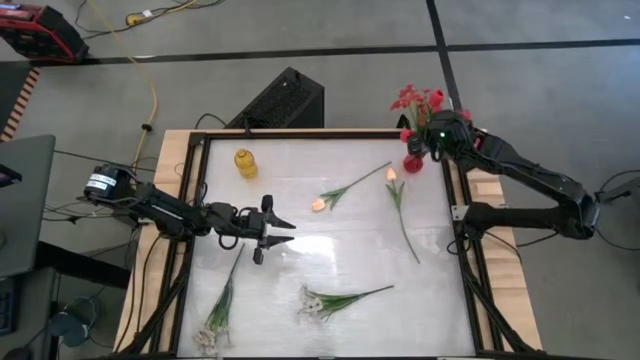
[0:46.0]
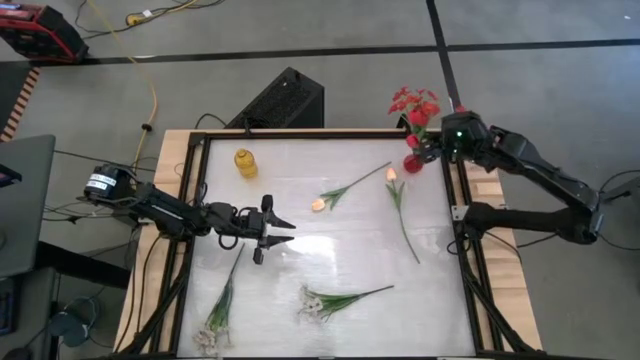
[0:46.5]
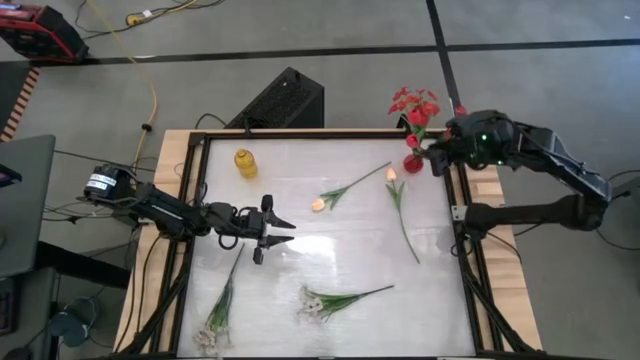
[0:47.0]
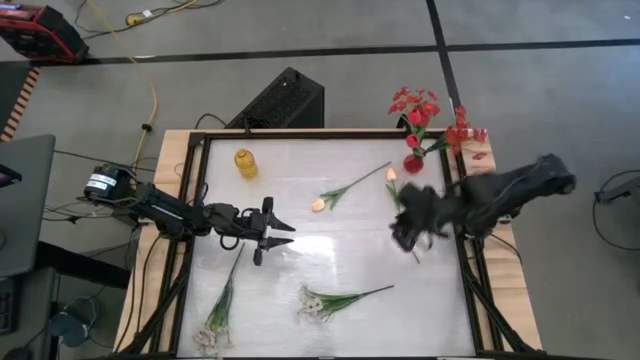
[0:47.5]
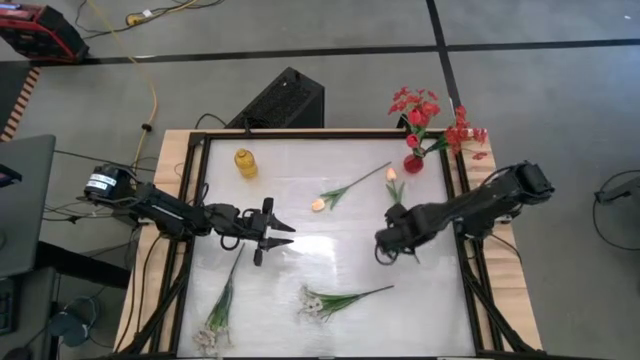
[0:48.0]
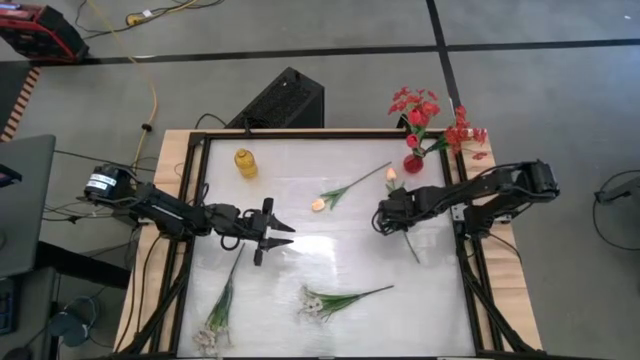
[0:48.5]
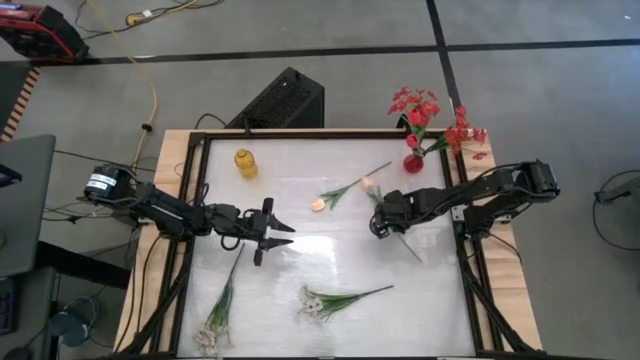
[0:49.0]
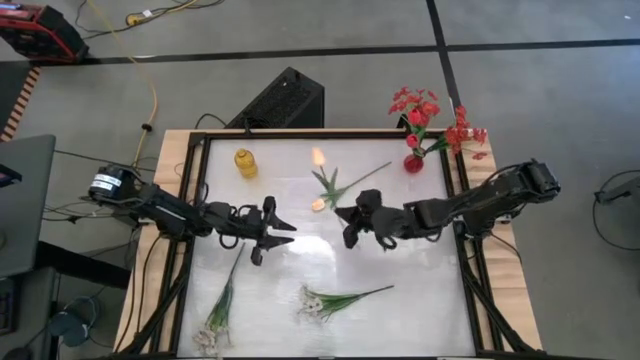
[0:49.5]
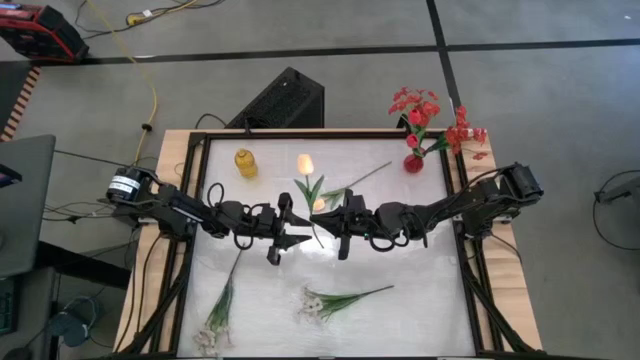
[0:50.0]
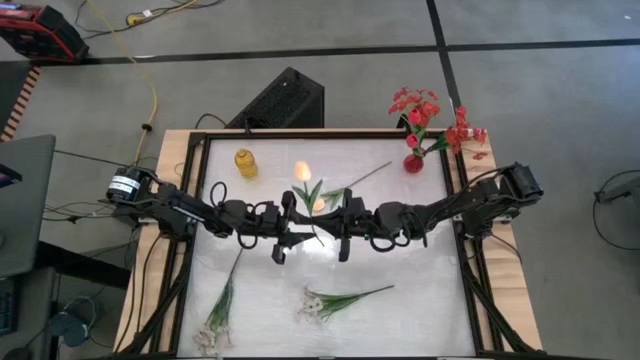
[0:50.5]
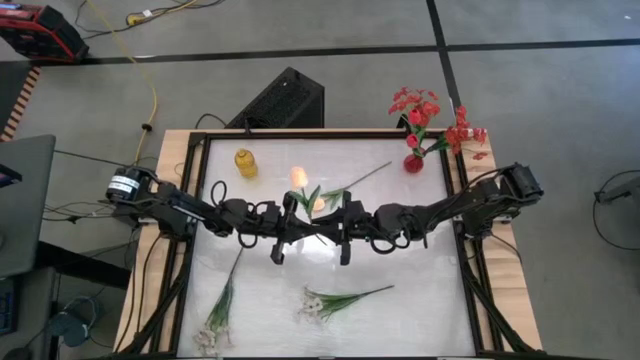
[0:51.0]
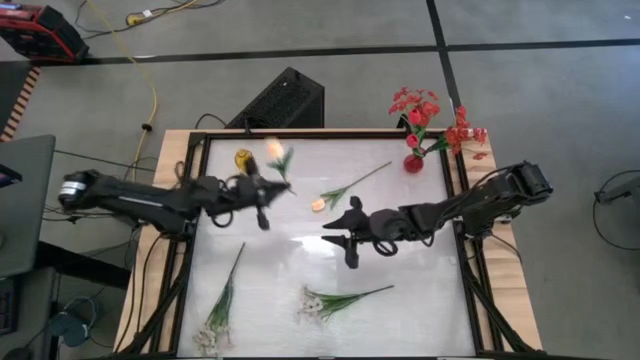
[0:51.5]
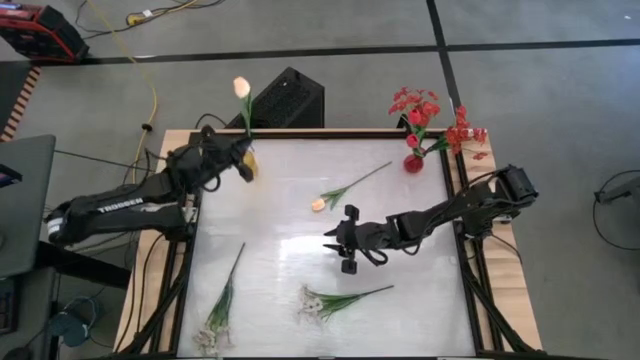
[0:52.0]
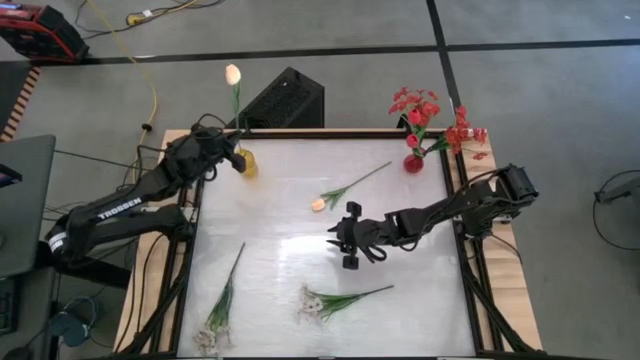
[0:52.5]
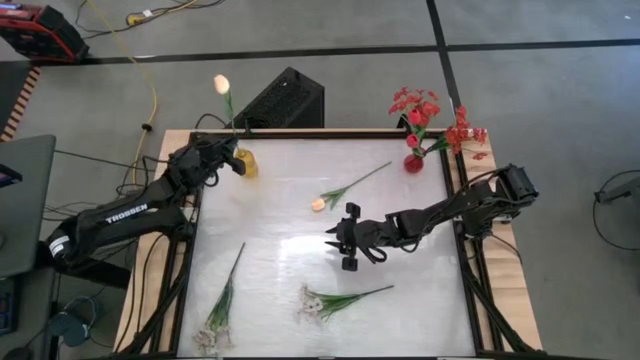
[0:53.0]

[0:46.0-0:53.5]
Task: Sort flowers into vase by color
Put the right yellow flower in the yellow vase

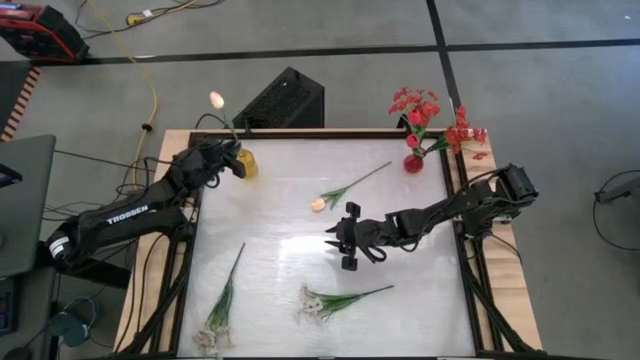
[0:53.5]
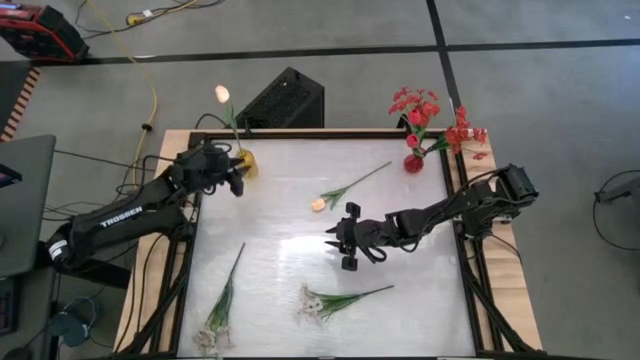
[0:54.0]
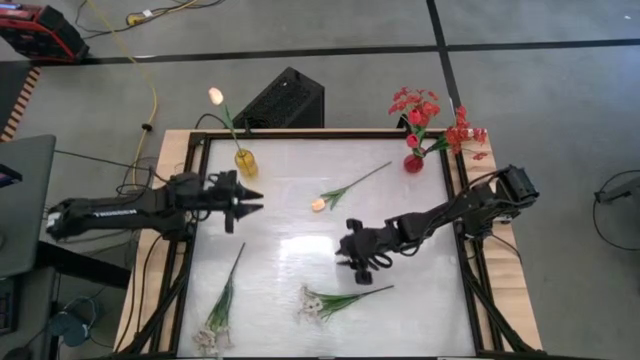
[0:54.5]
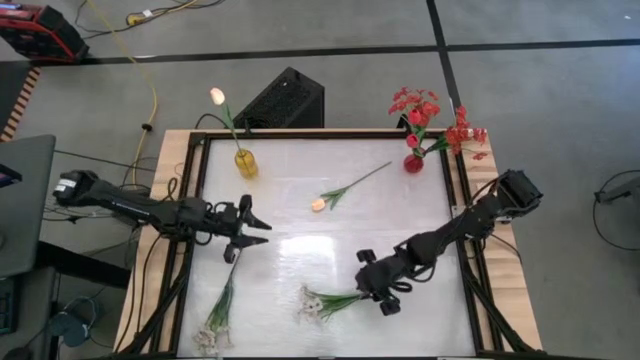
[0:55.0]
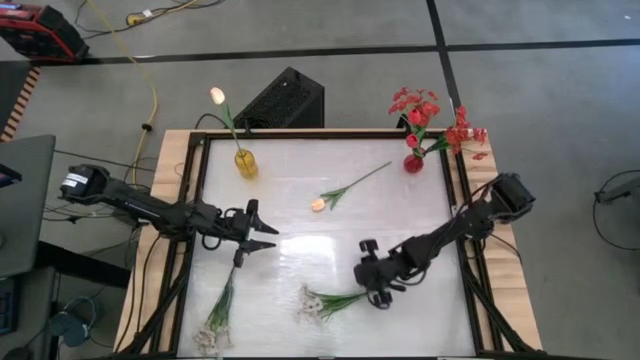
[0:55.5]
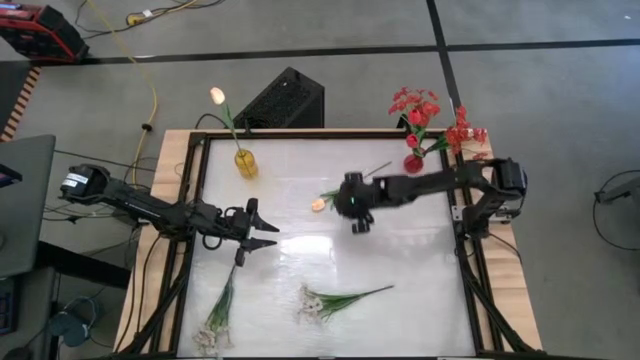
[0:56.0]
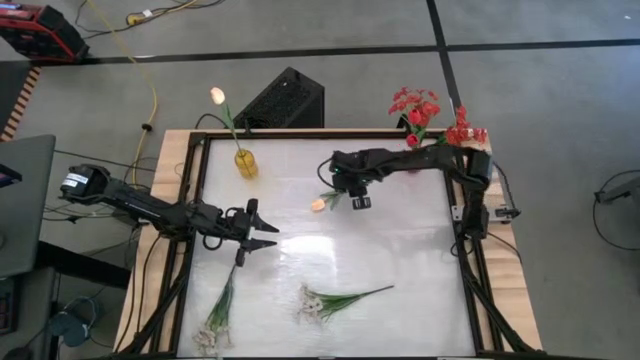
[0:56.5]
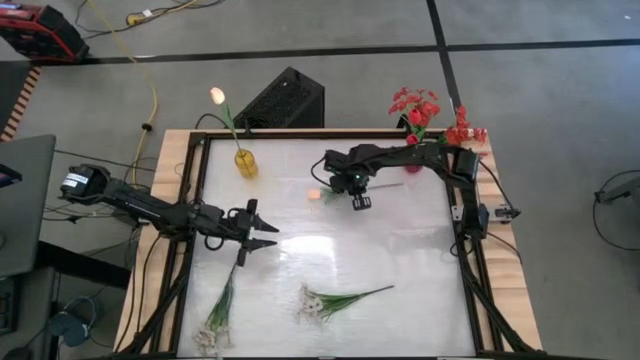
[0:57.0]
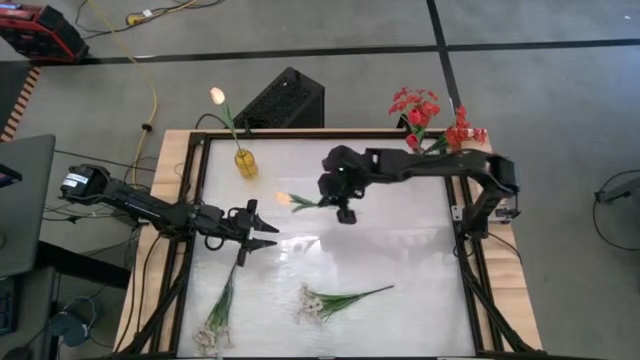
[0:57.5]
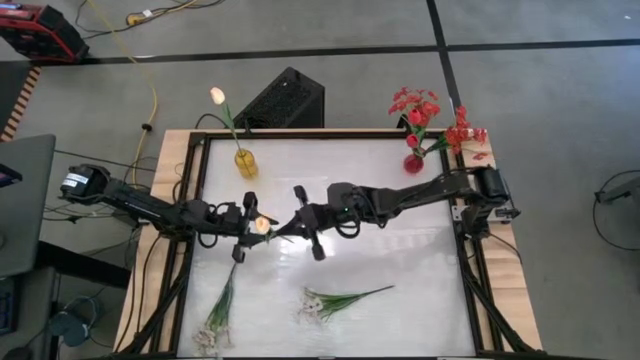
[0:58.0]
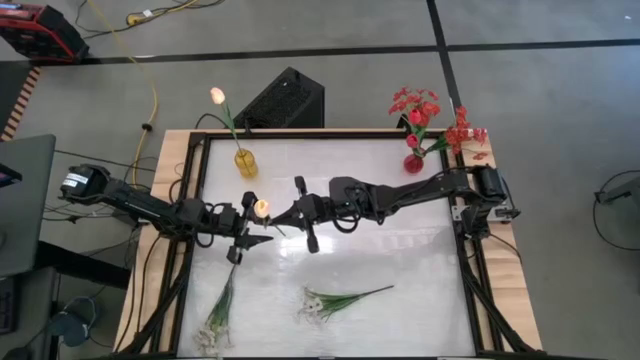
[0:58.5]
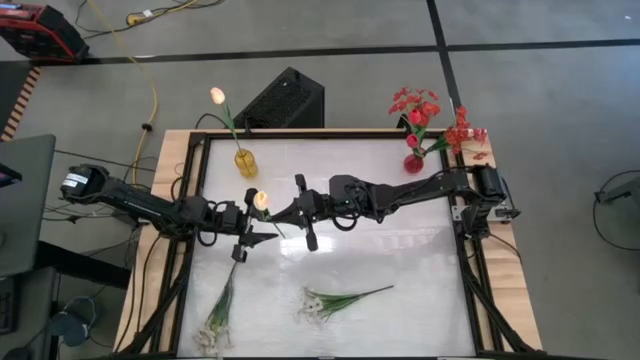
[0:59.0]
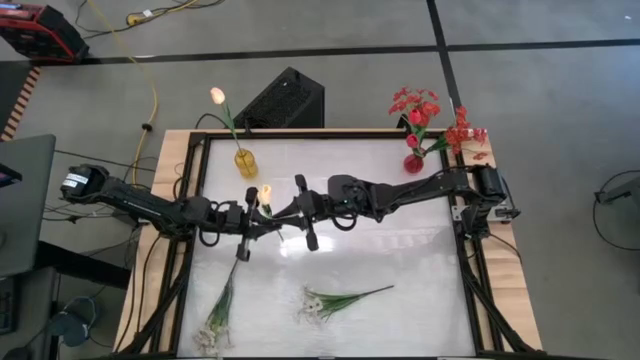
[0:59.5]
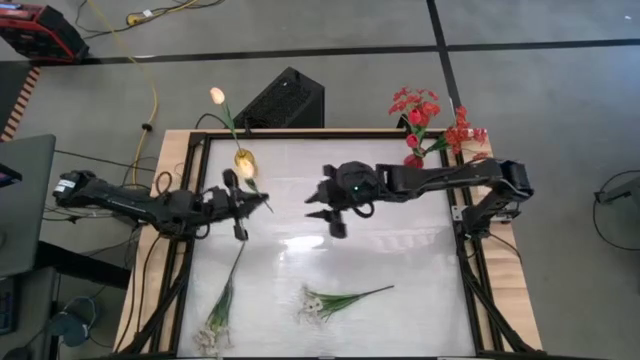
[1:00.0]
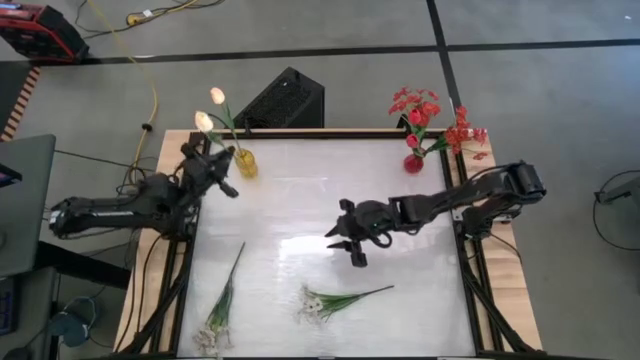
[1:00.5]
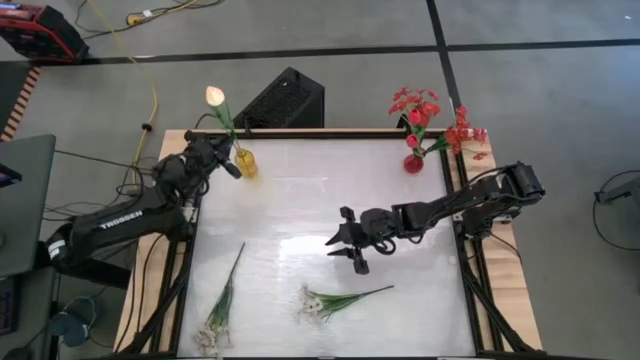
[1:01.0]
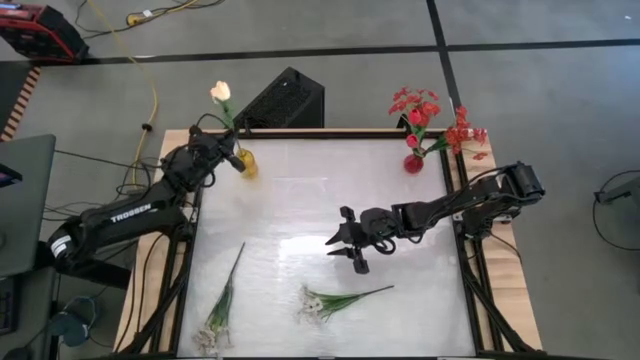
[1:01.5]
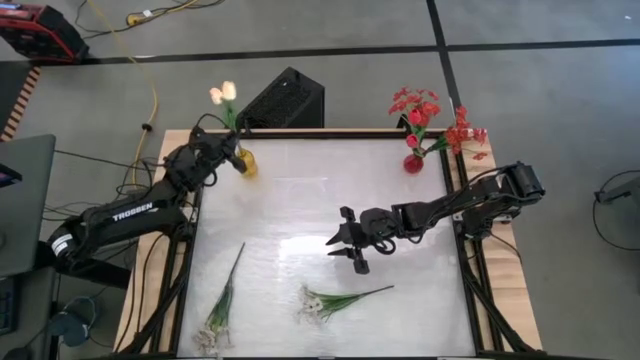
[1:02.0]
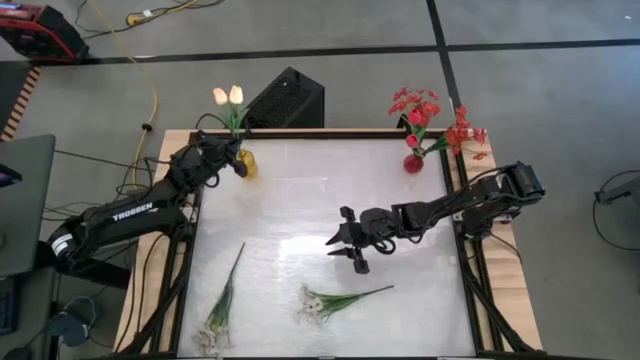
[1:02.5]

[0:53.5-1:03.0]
Put the yellow flower into the yellow vase

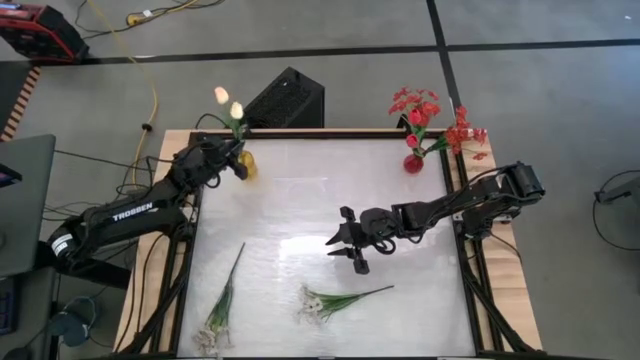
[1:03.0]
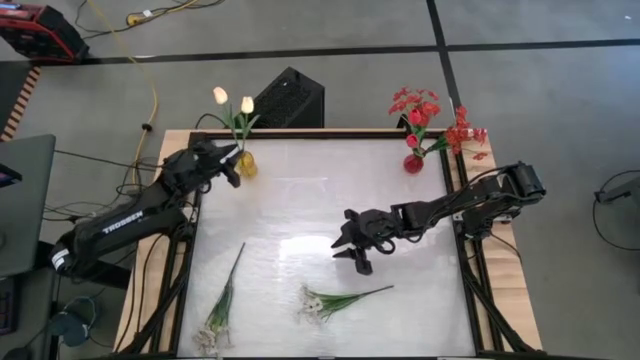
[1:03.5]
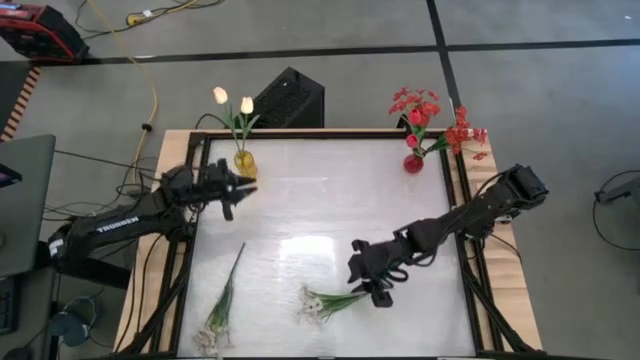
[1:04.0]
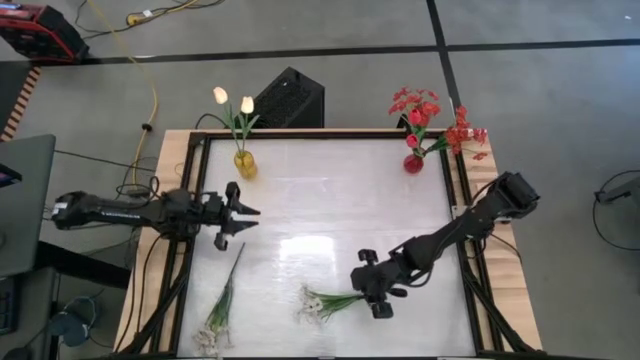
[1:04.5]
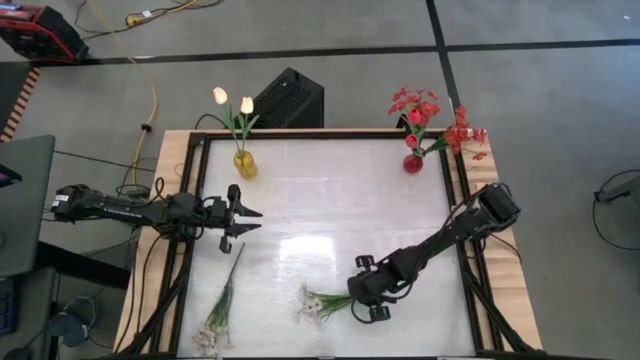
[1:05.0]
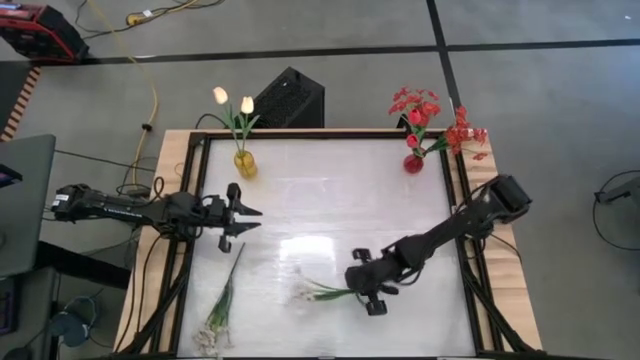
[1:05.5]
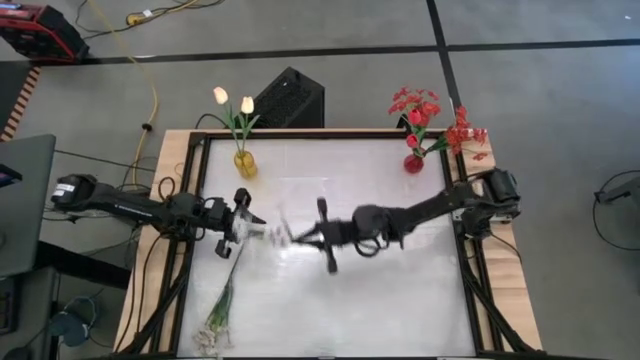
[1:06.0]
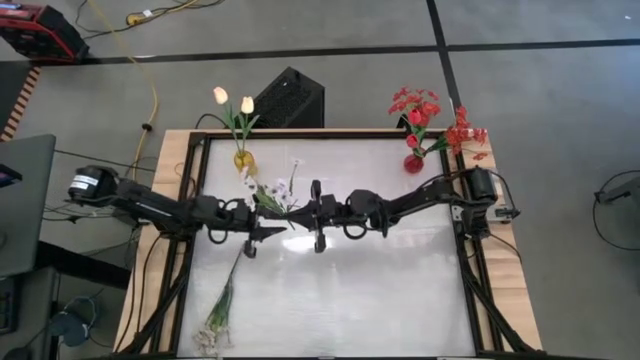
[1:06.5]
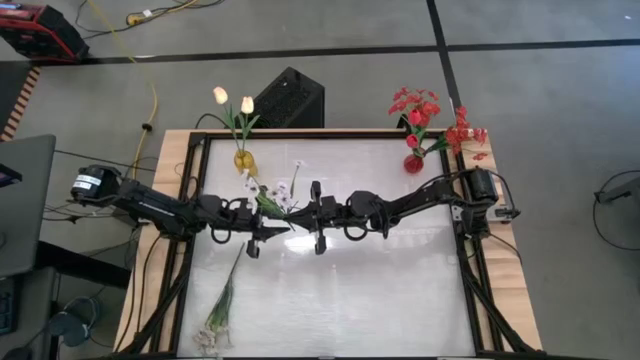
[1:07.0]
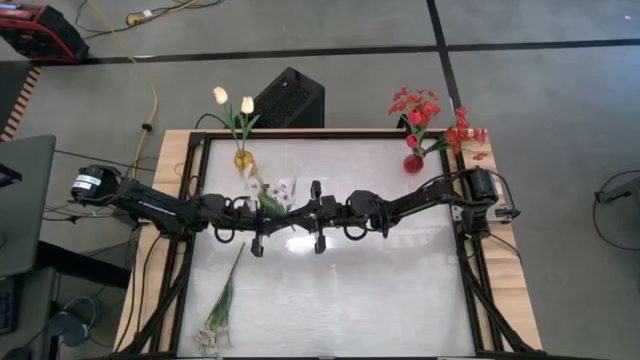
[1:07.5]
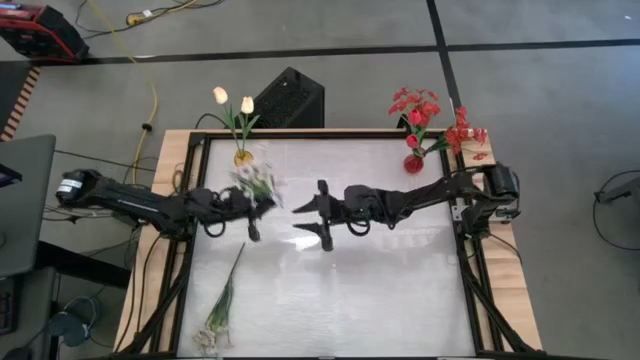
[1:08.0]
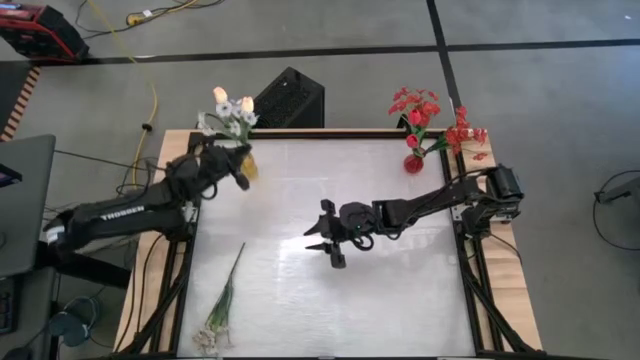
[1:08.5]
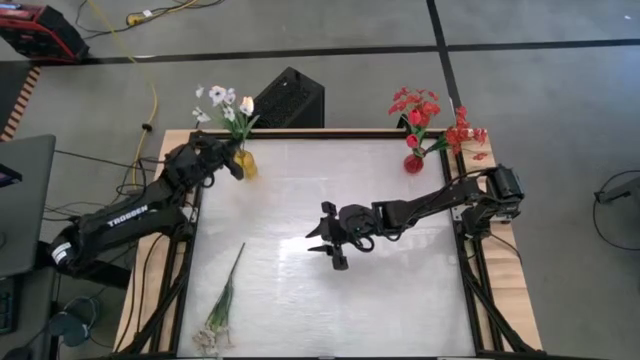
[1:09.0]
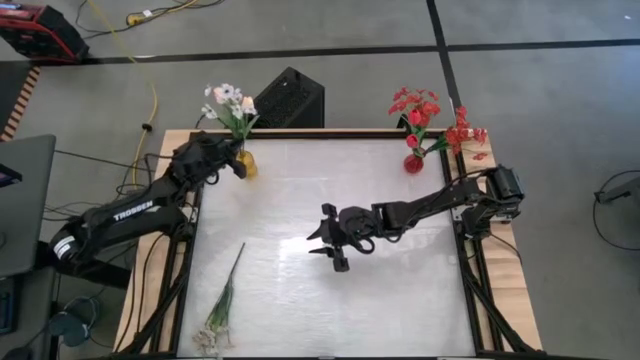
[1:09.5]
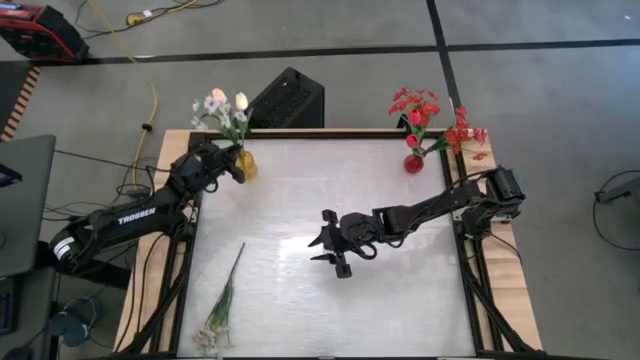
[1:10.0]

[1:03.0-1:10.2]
Put the right white flowers in the yellow vase
